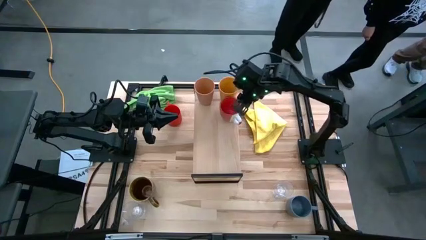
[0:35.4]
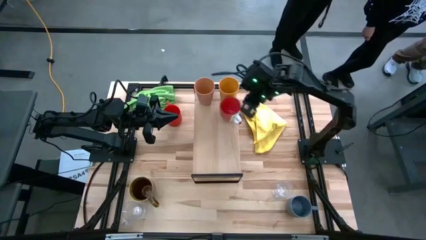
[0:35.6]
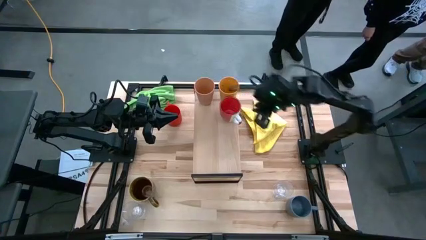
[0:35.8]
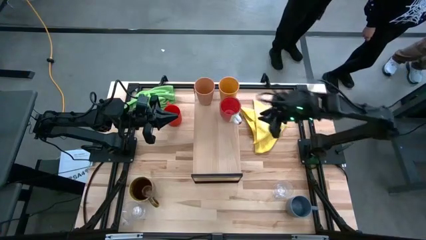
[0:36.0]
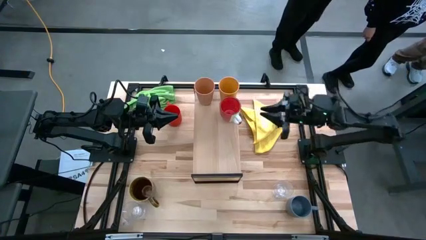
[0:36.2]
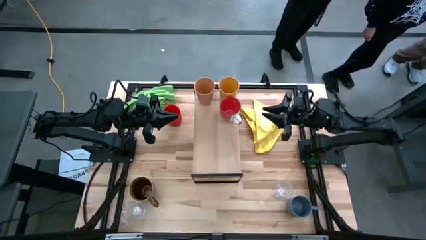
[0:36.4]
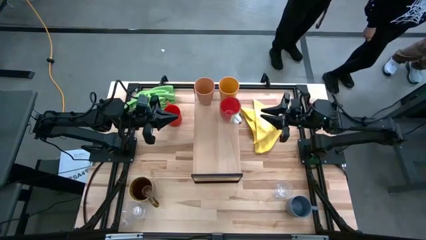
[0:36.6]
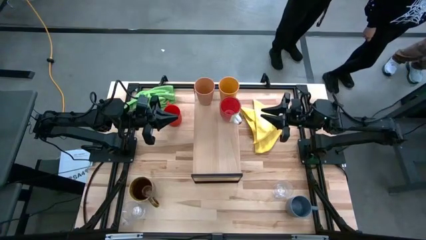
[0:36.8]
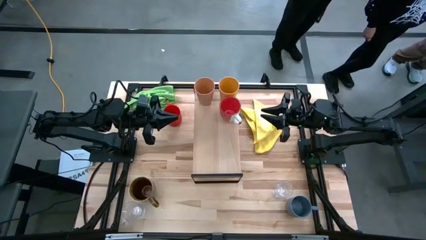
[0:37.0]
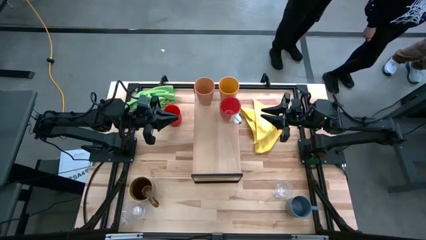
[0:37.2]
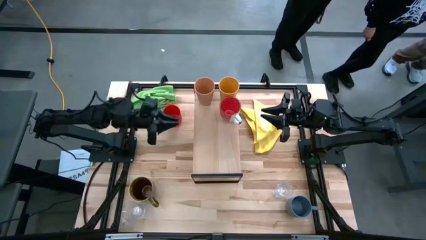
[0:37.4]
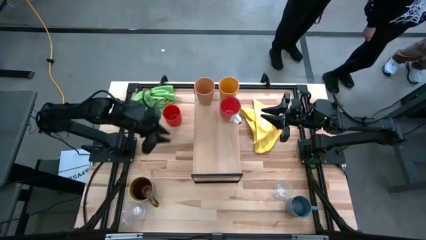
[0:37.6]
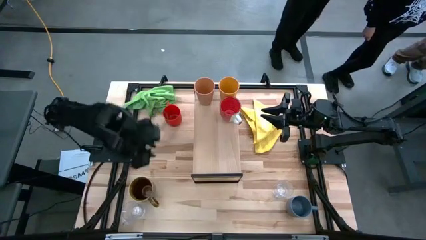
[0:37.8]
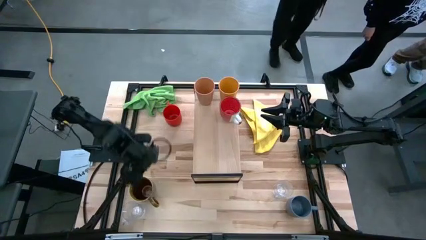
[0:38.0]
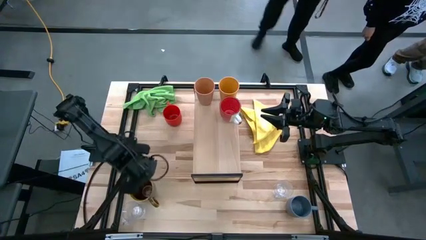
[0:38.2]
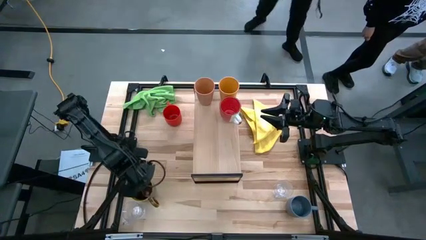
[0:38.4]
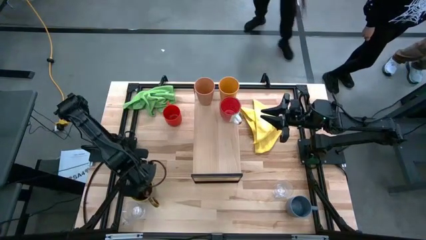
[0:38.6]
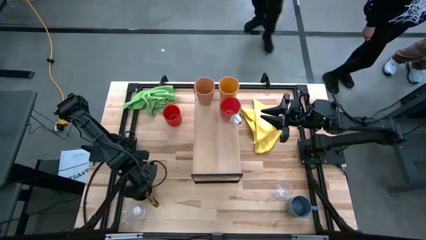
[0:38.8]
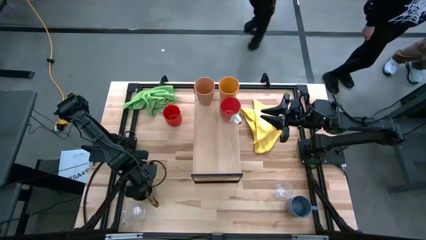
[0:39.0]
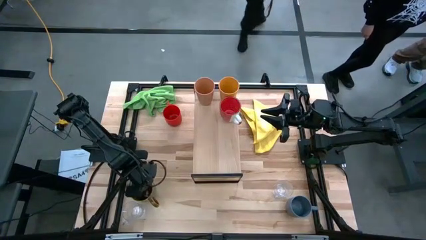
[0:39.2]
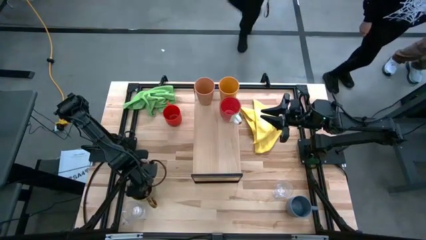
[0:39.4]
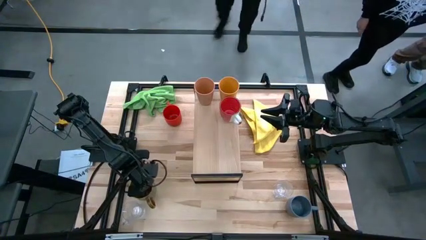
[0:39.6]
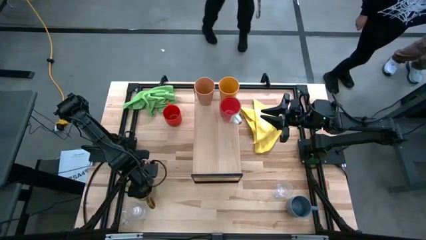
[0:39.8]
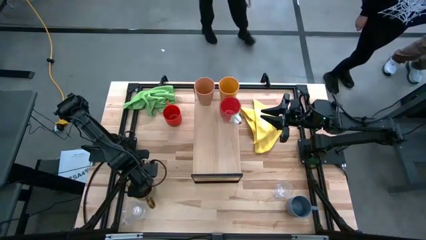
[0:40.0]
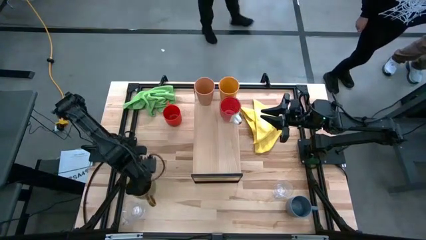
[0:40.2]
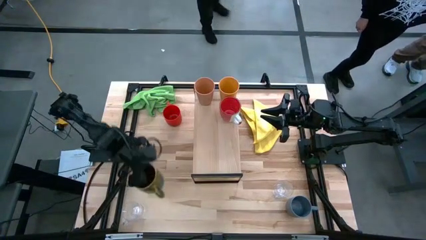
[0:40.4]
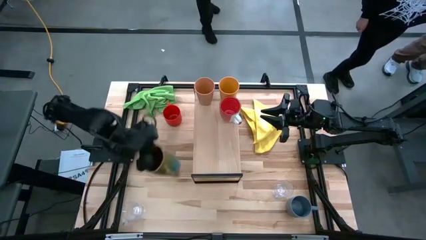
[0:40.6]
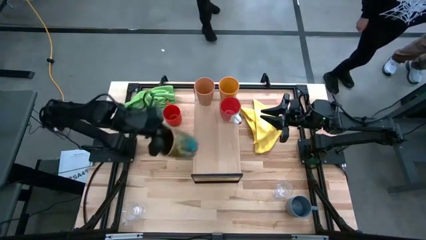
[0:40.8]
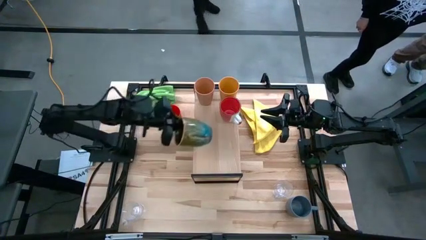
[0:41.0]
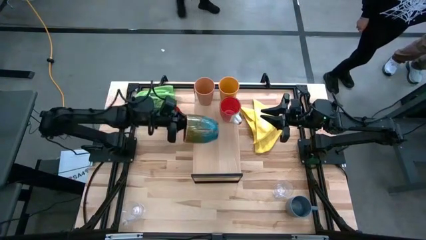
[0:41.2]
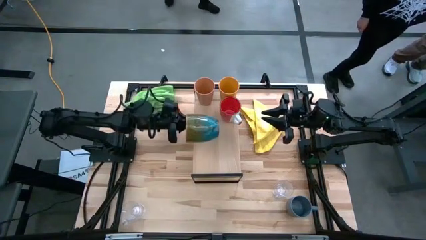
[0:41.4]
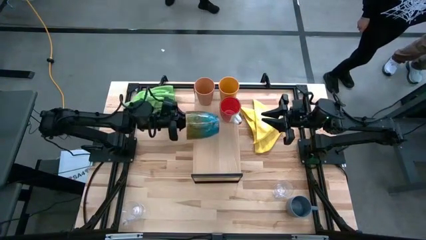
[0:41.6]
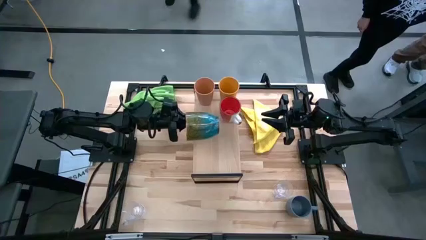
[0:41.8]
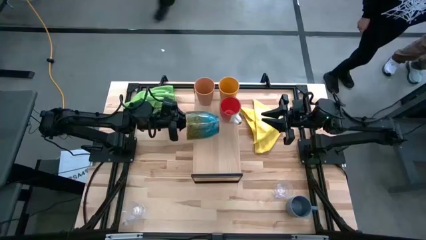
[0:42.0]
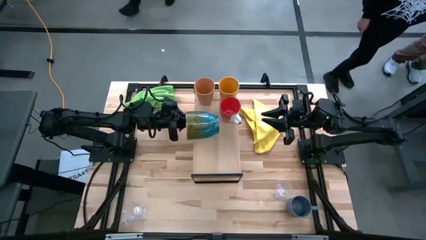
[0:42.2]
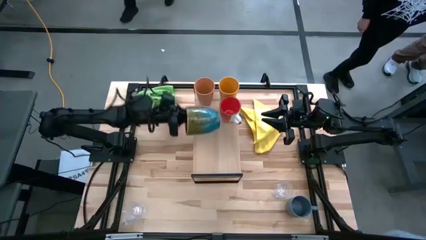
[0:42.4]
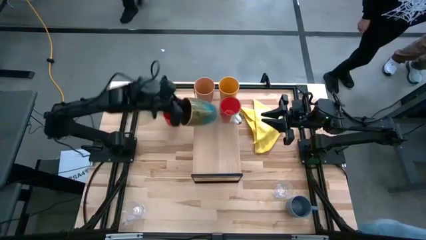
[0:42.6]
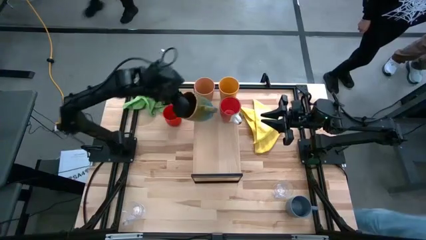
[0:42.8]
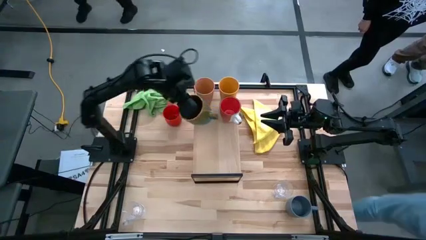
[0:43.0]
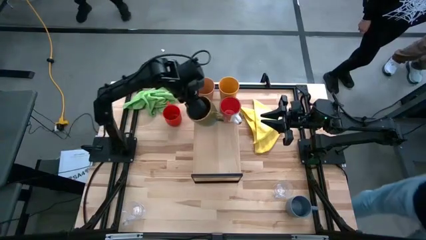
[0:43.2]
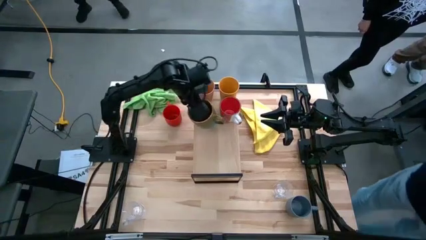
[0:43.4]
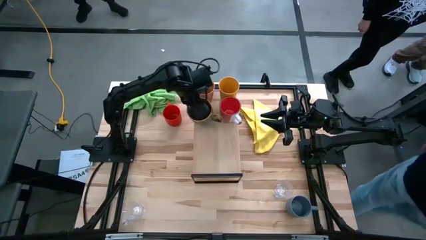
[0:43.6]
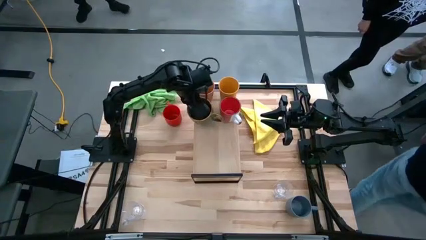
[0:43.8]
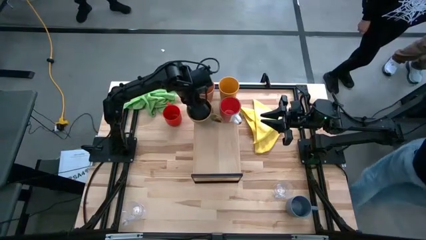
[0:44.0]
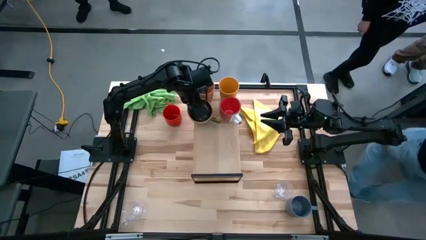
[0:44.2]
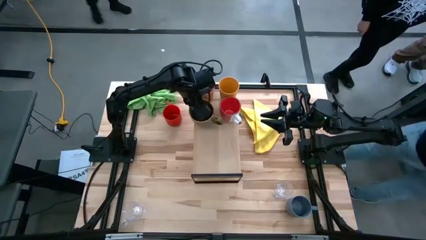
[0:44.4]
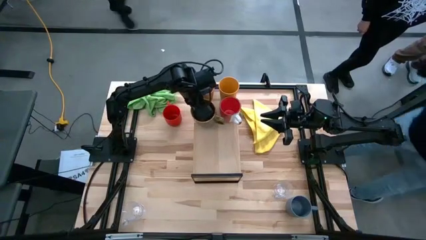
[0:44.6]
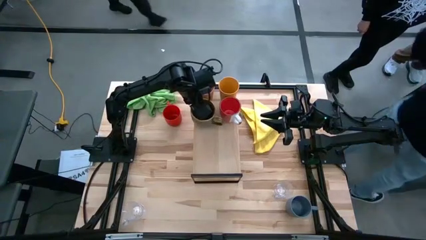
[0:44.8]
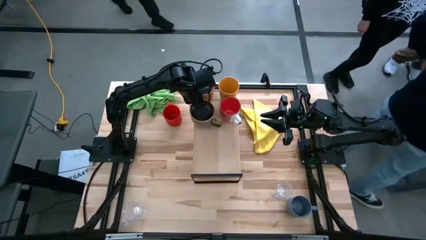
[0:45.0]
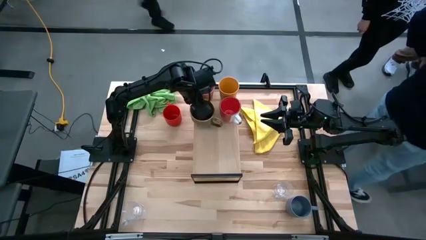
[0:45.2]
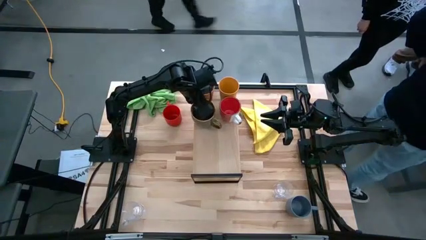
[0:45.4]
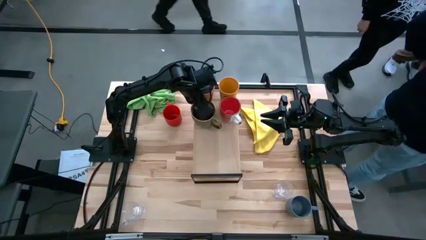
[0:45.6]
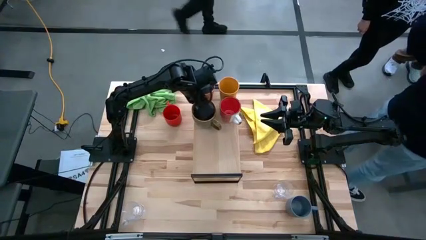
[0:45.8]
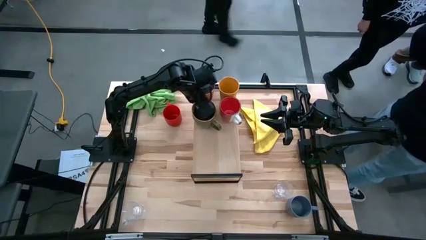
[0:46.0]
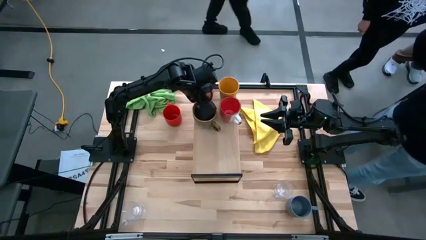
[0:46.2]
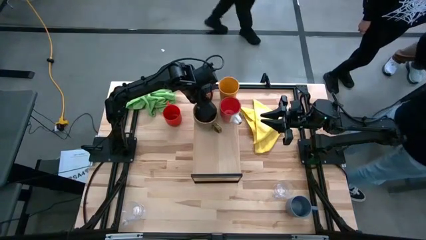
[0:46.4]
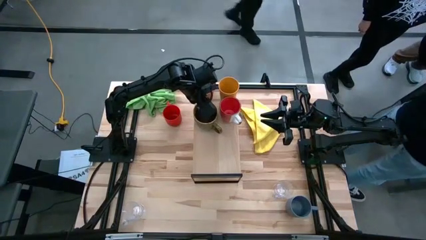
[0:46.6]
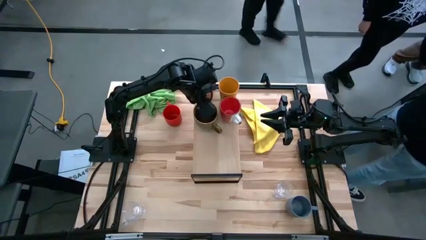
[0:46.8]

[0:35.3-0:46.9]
Task: Stack small to large cups/mugs on shelf
Put the green cup on the shelf

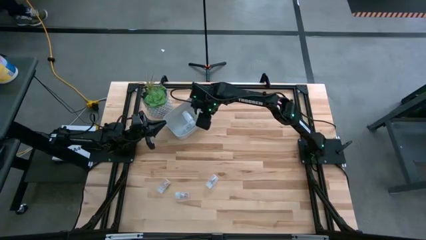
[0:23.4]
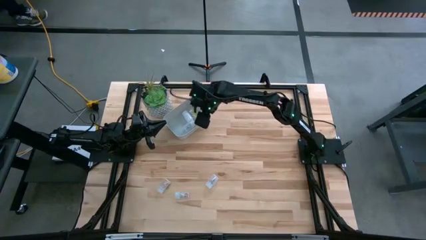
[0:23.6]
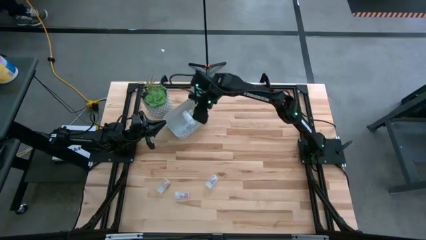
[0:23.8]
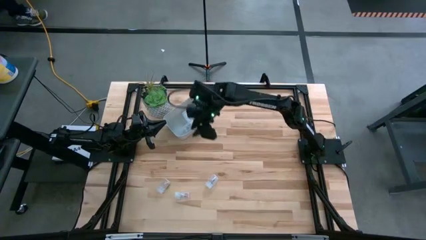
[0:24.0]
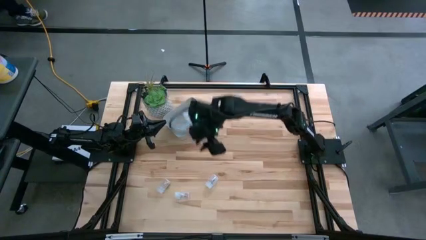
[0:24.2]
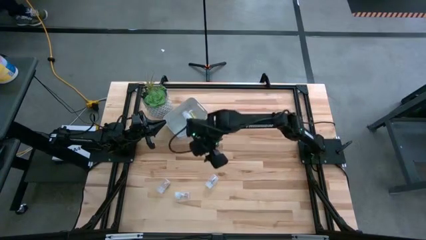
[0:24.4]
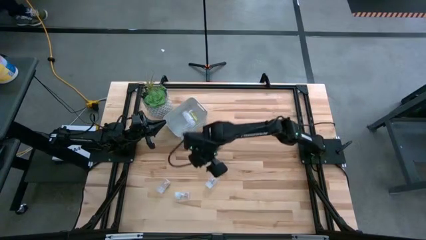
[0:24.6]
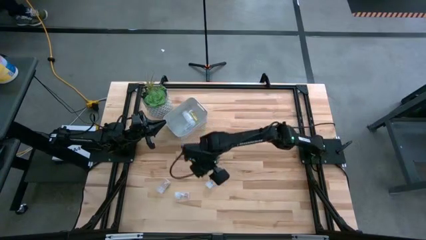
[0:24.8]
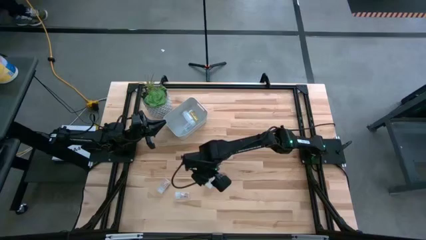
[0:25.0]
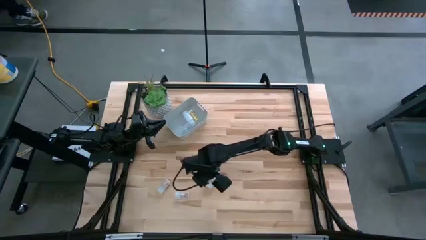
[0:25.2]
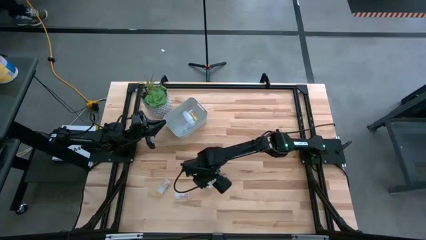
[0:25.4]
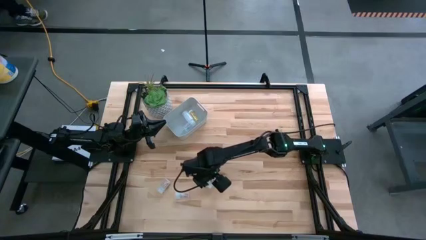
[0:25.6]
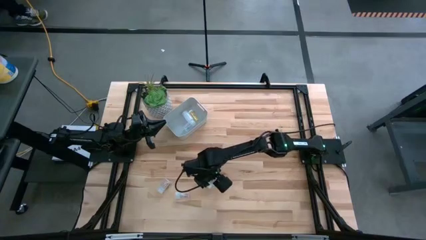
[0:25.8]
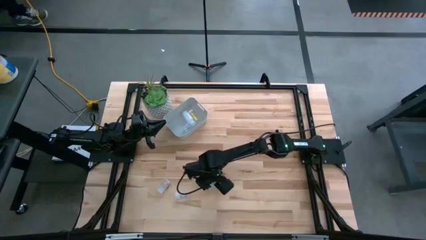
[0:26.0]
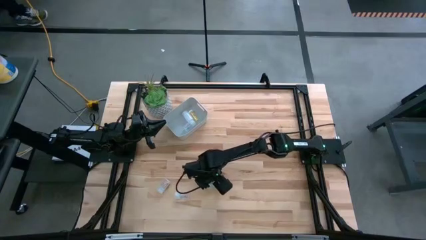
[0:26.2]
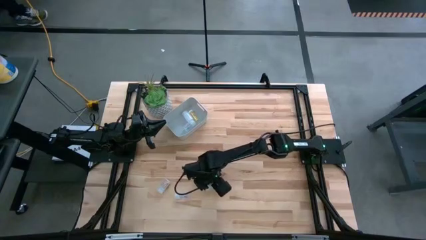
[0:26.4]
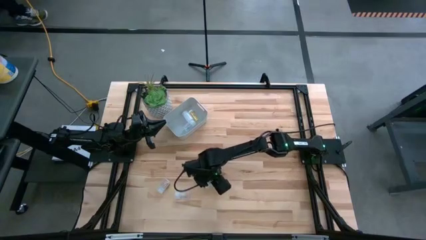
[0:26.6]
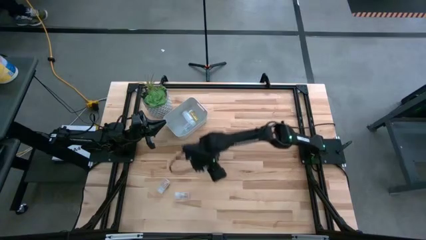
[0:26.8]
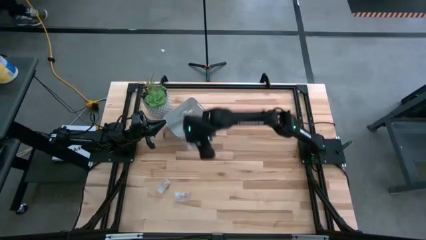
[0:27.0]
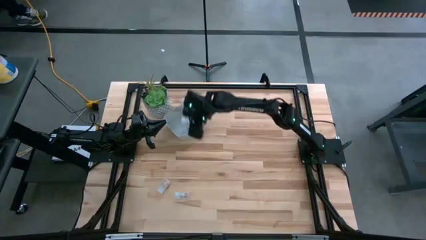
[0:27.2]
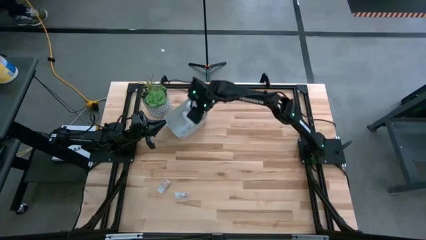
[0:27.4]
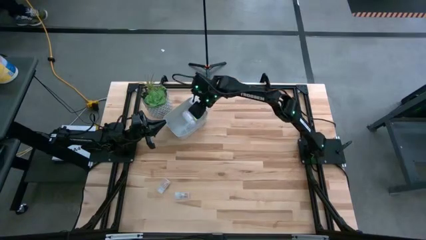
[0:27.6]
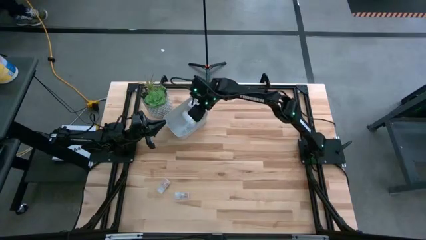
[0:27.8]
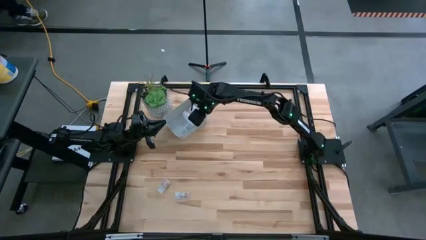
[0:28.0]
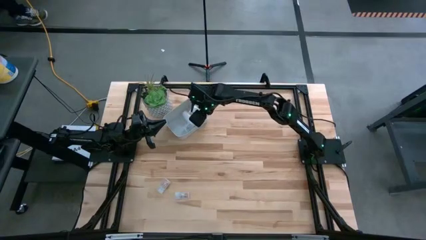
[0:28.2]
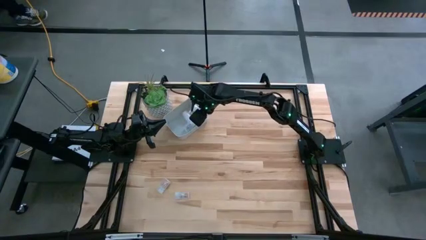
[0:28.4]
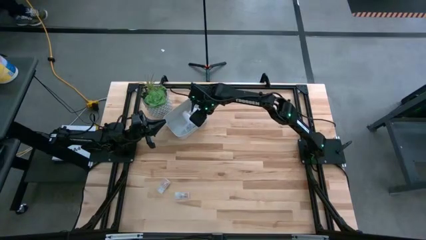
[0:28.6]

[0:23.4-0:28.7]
Task: Pick and place pill bottles into a basket
Put the right transparent pill bottle into the bin
